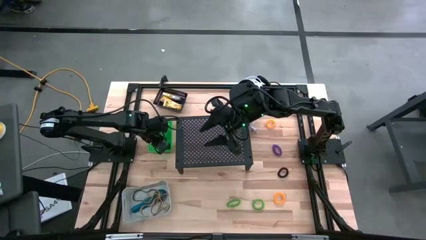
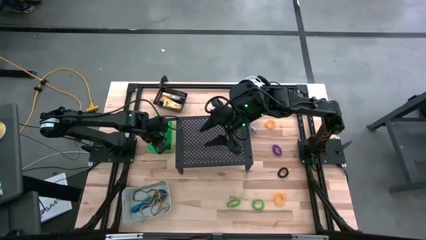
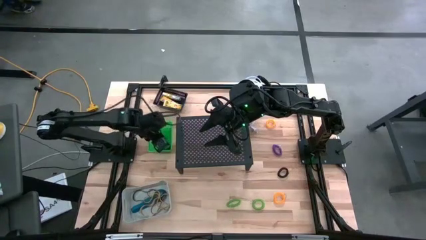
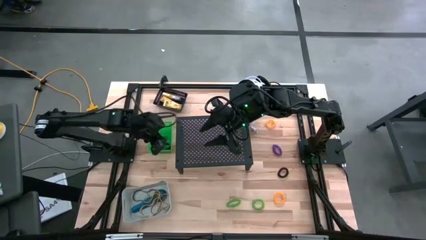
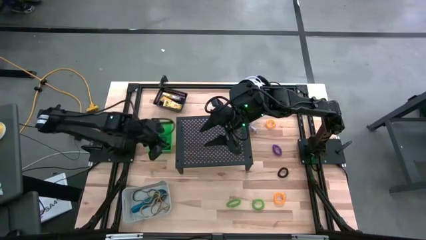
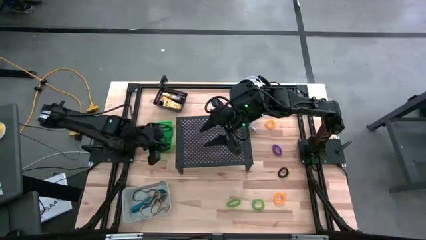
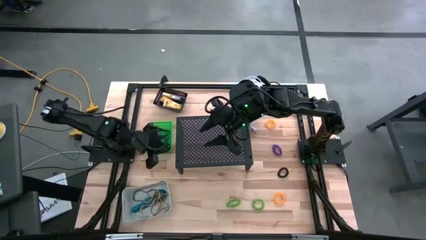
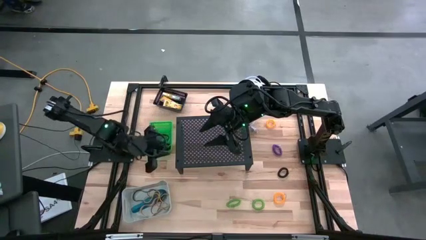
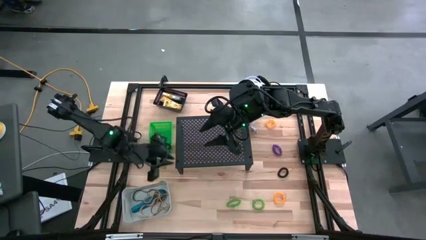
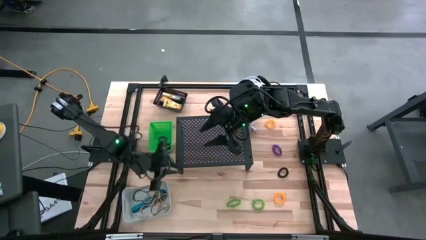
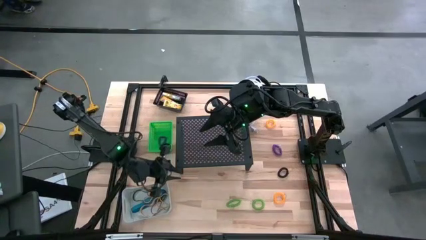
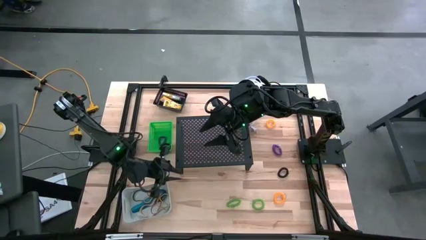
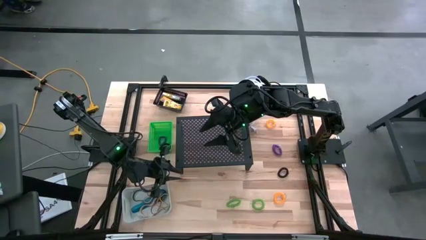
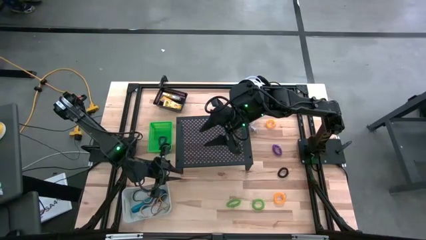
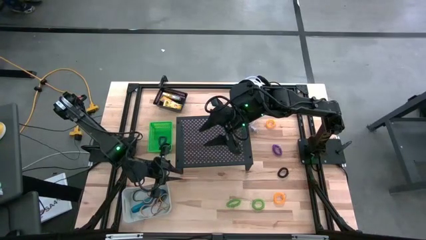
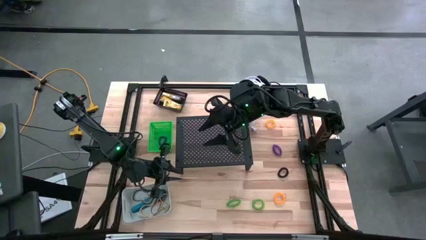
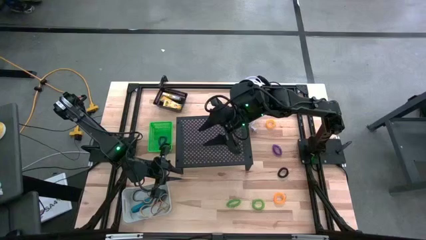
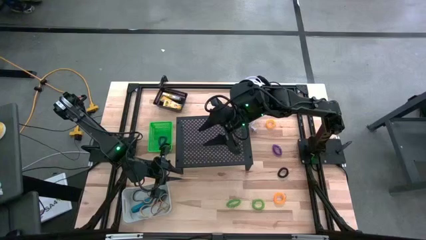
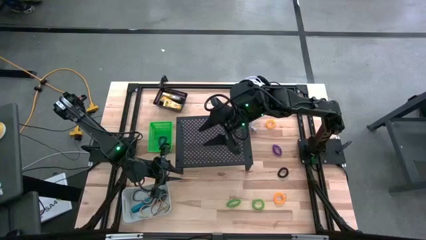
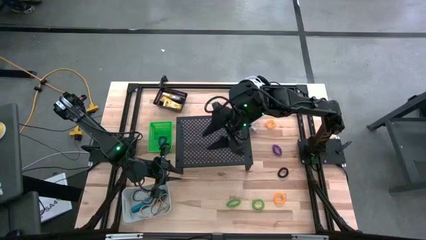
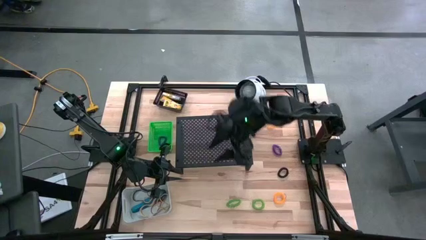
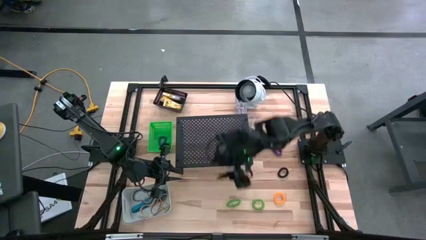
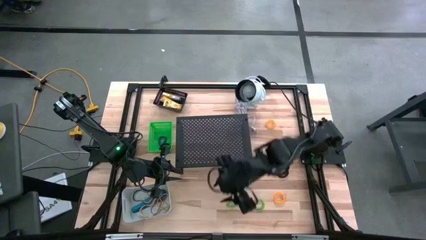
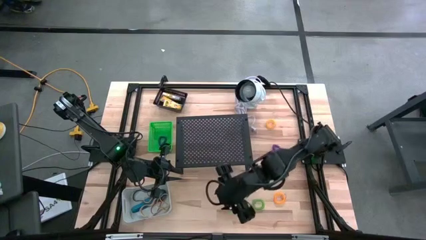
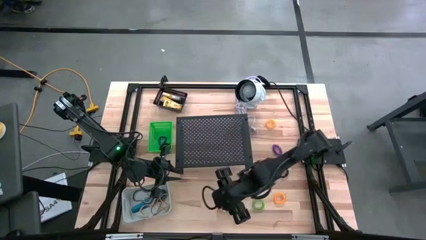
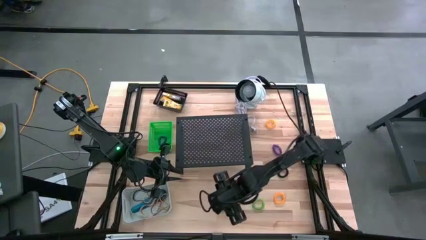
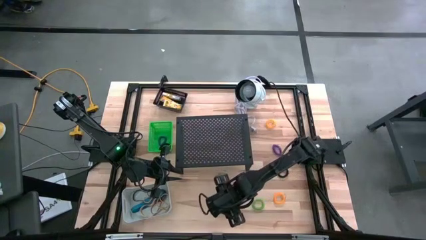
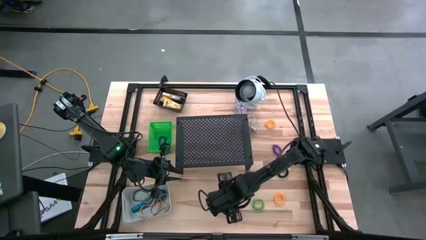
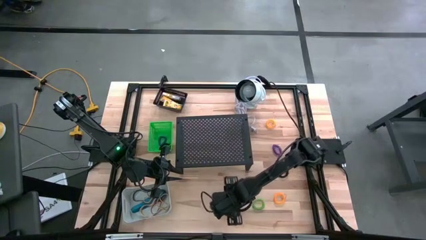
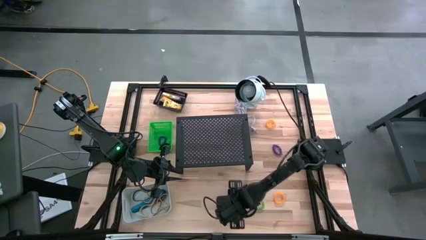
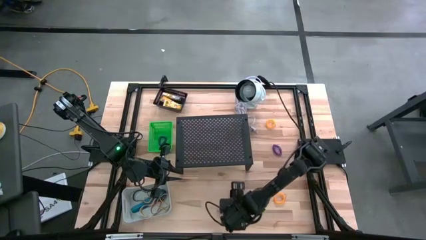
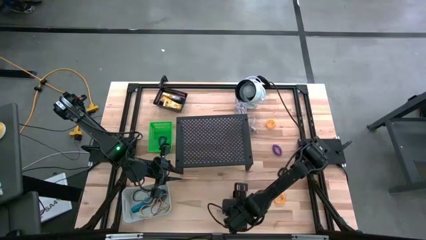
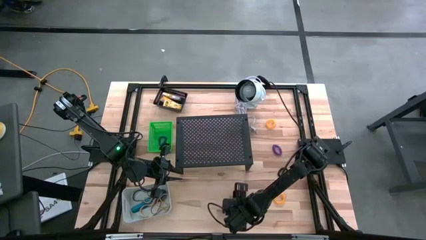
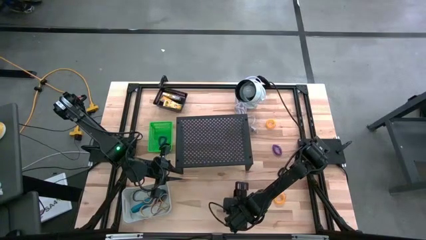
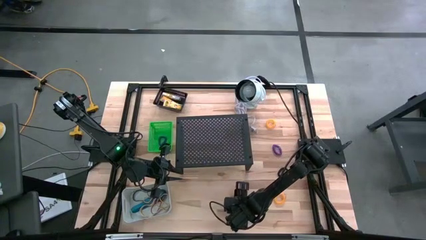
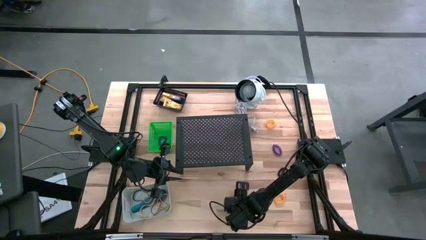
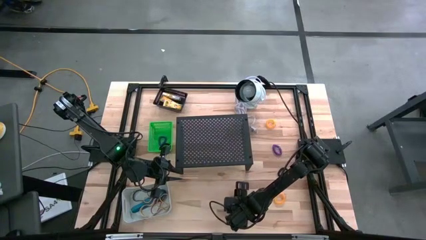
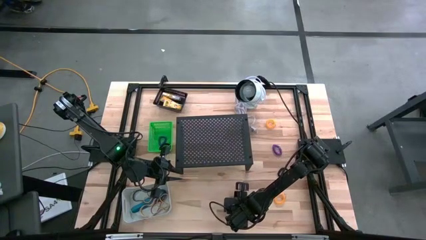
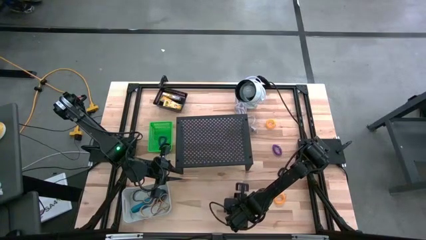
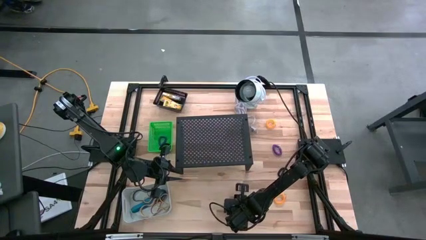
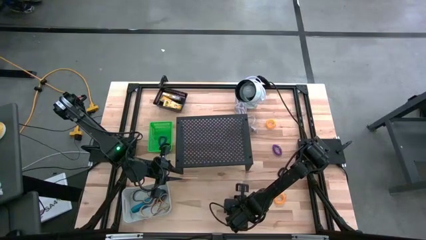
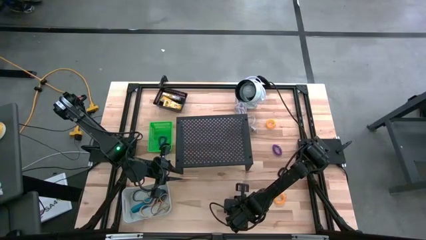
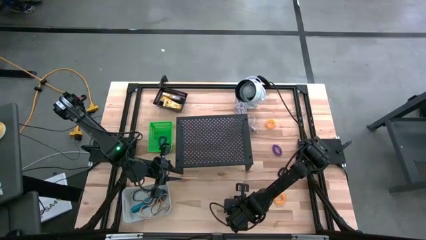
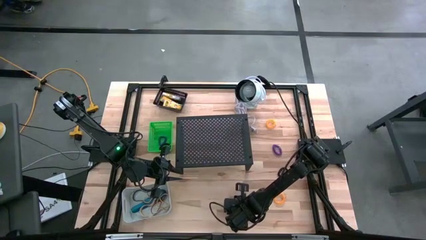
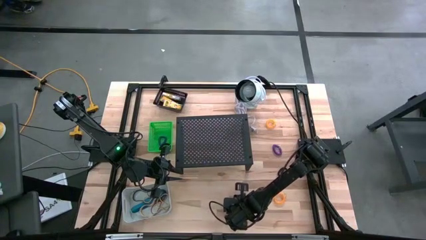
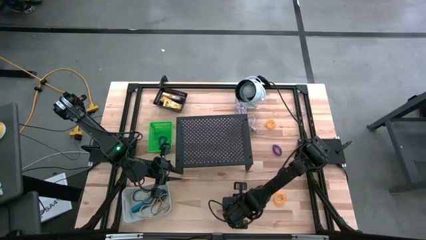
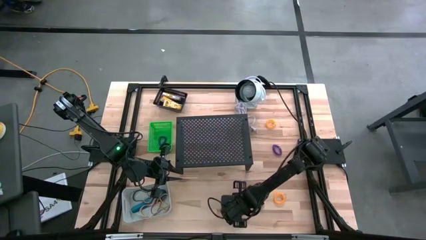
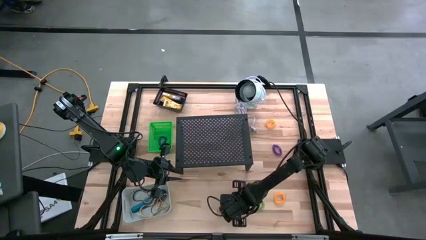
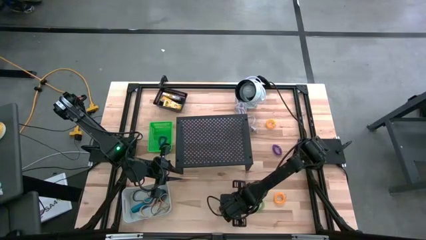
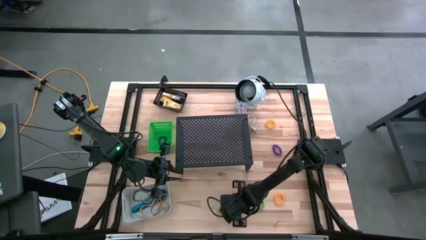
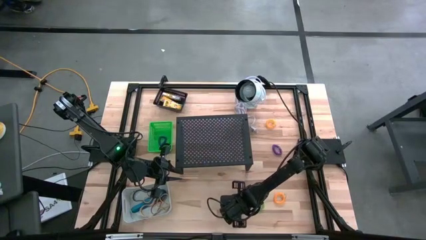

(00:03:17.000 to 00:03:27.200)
Task: Pick & Place Office Desk Supplies
Put the left green spring keychain into the green bin

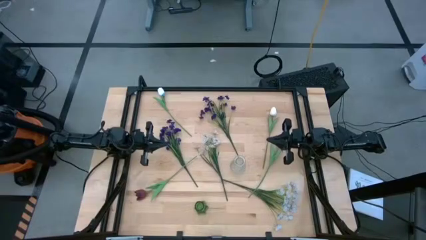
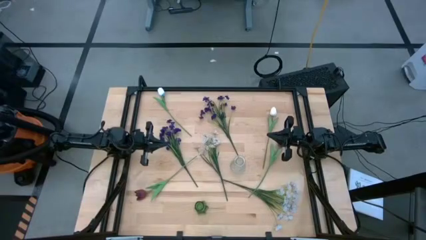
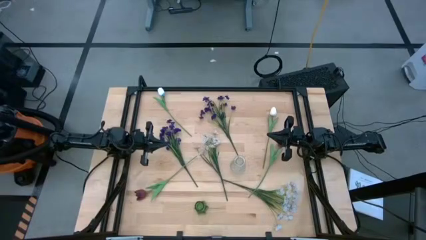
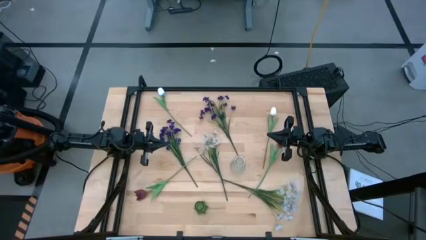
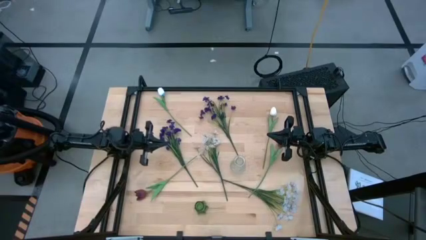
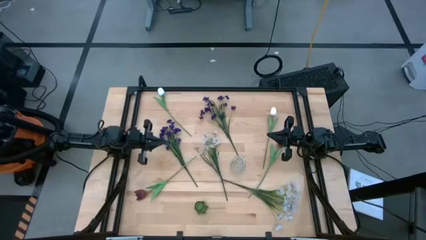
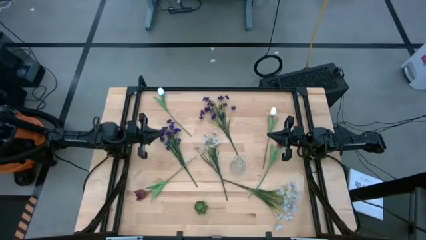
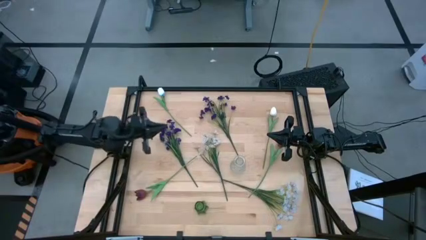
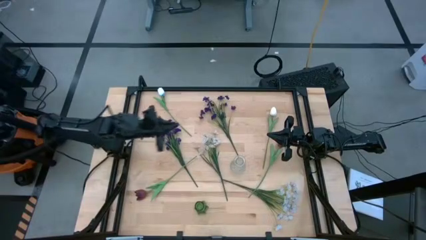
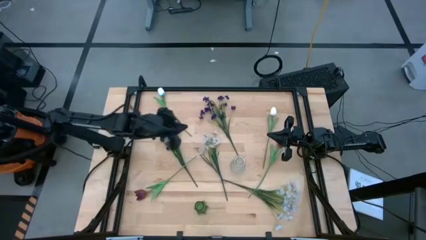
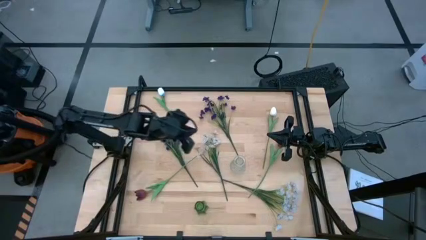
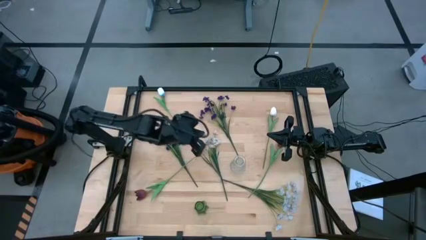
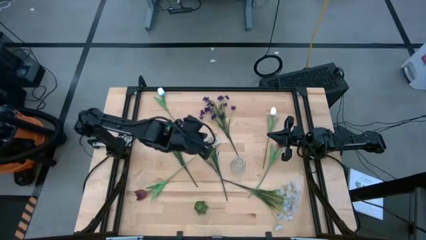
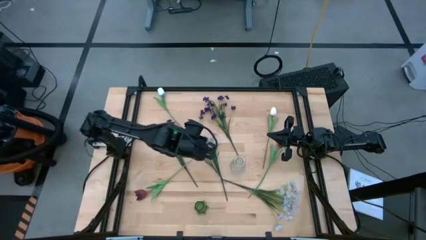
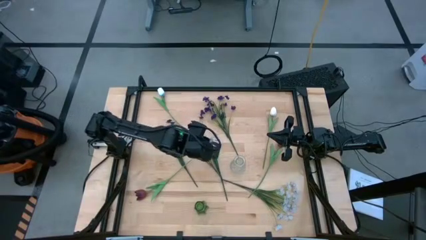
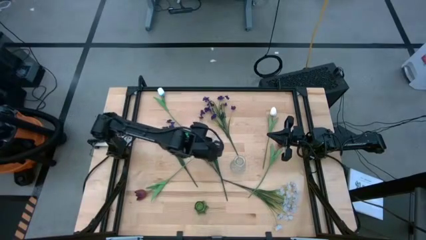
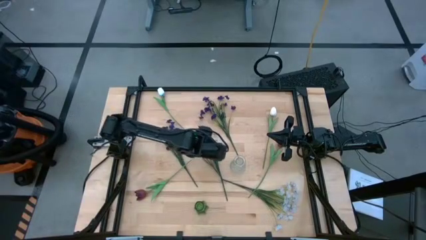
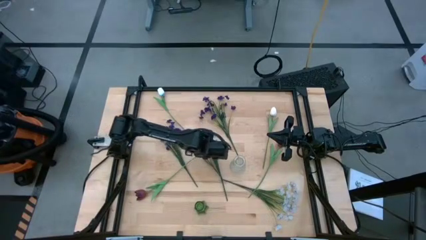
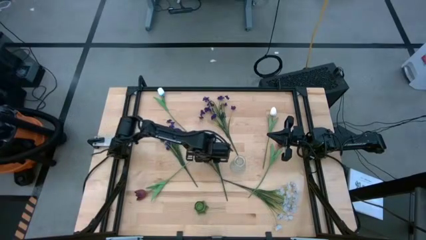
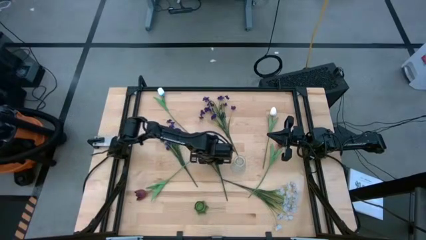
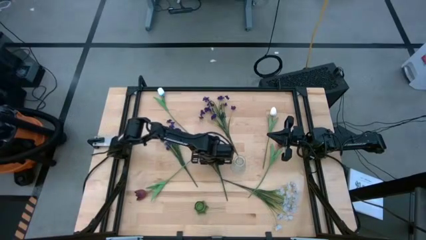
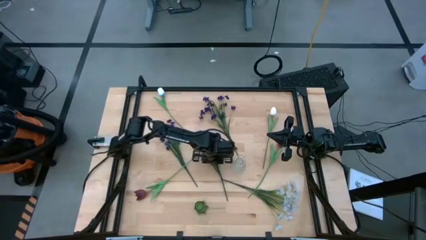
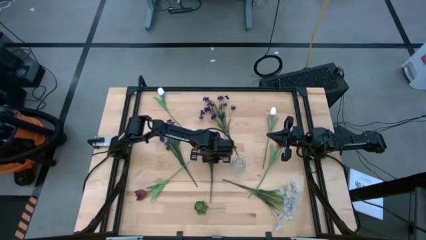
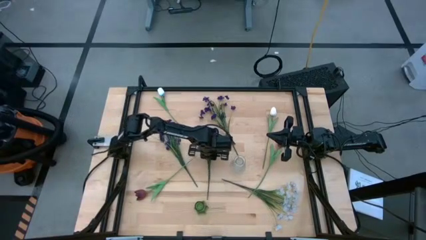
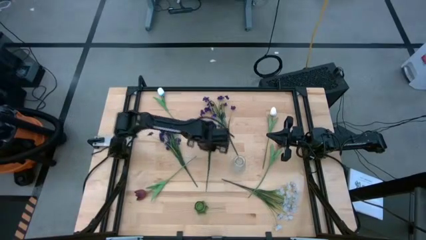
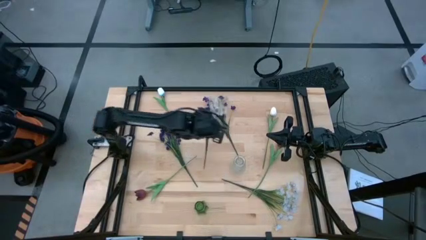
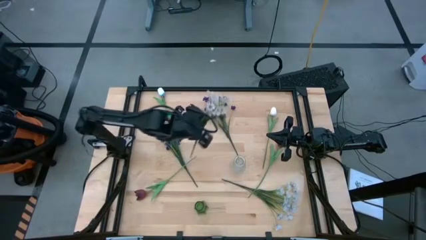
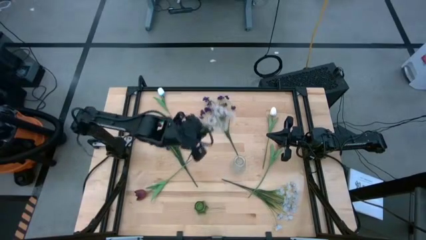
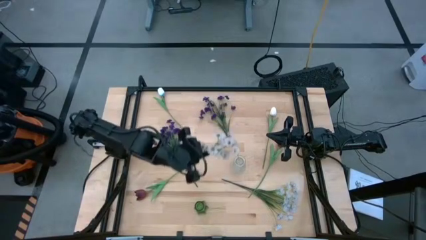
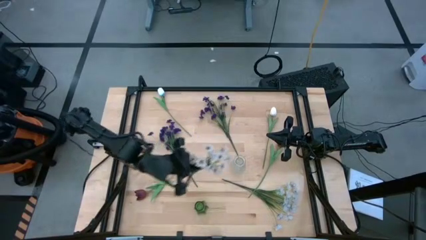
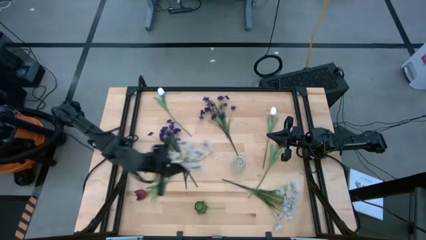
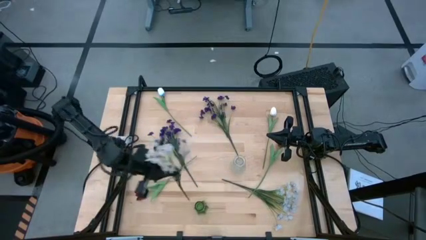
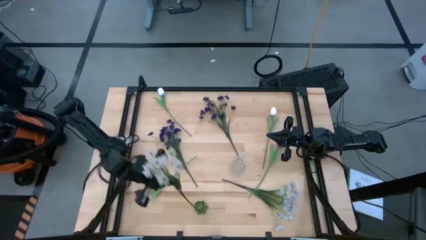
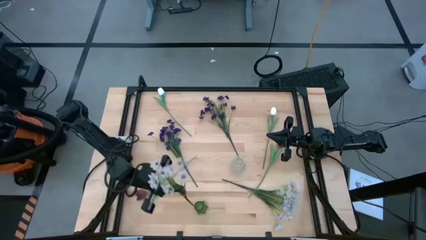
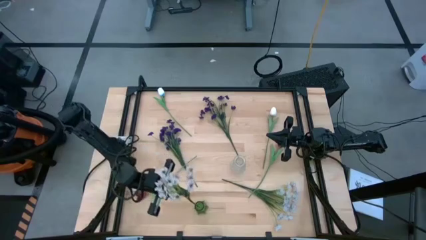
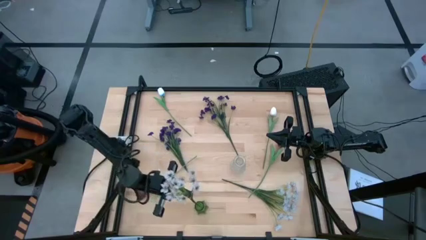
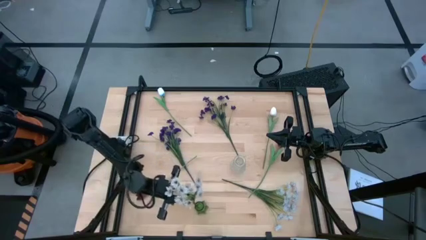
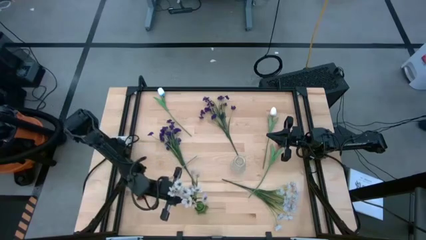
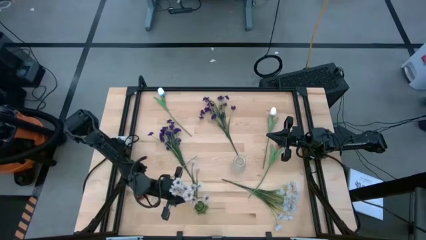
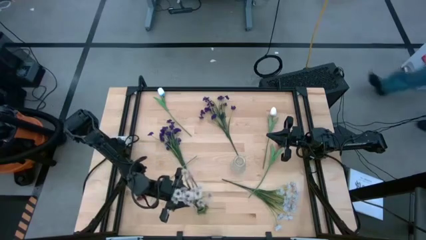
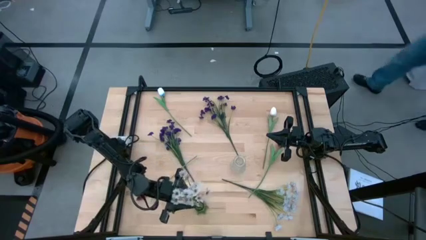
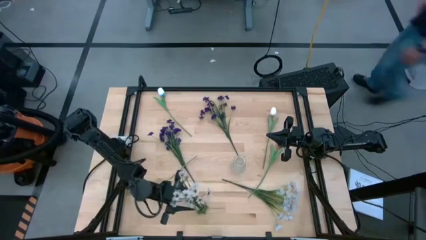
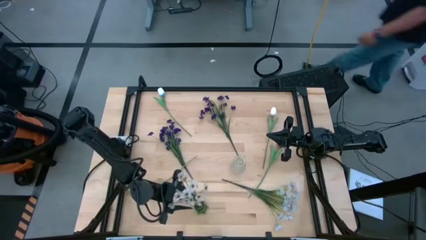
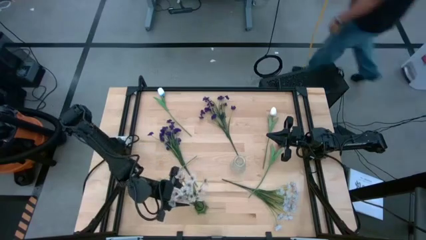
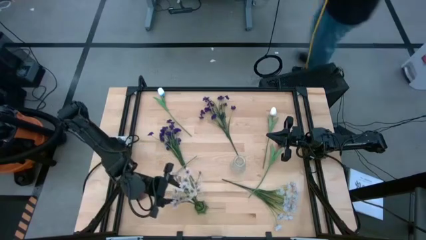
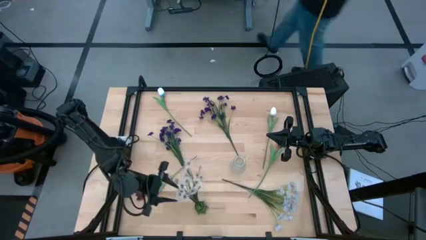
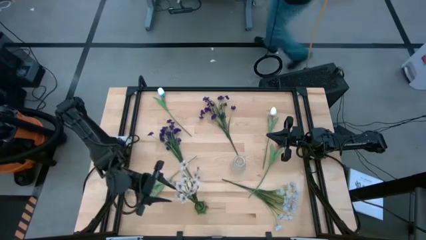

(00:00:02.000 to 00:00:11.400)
Task: Sort flowers into vase by color
Put the left white flowers into the green vase
